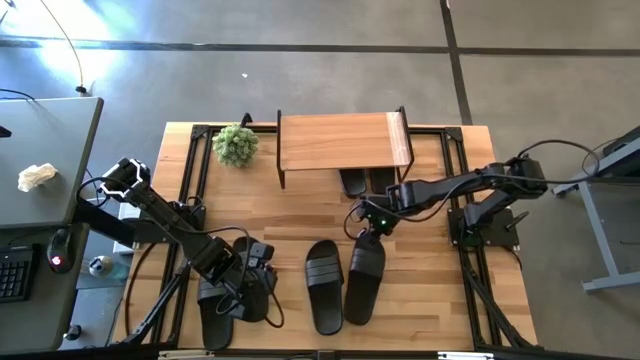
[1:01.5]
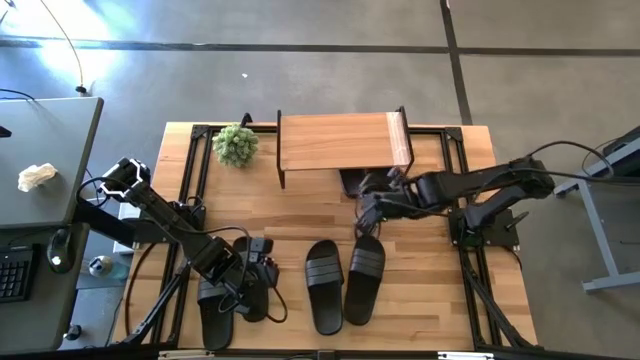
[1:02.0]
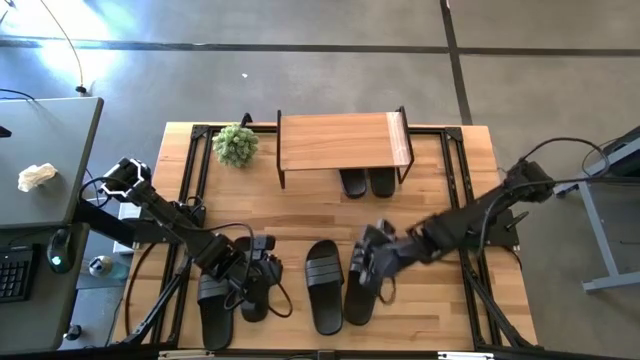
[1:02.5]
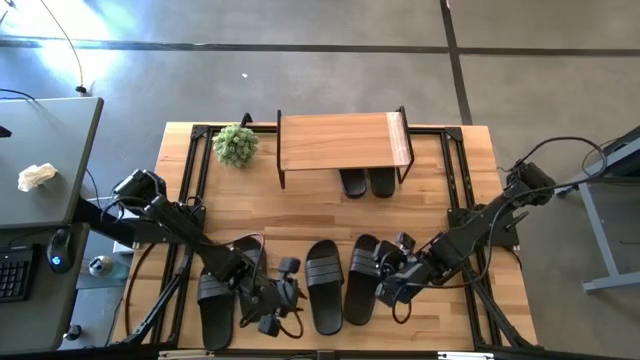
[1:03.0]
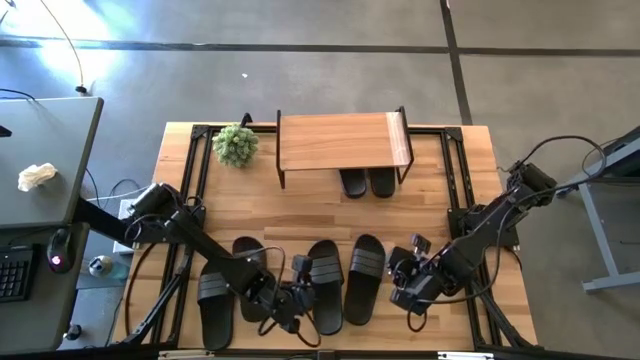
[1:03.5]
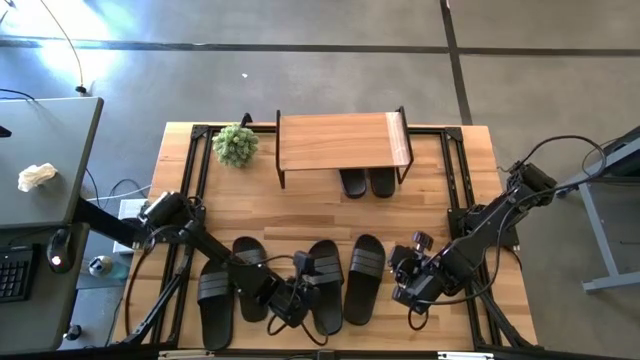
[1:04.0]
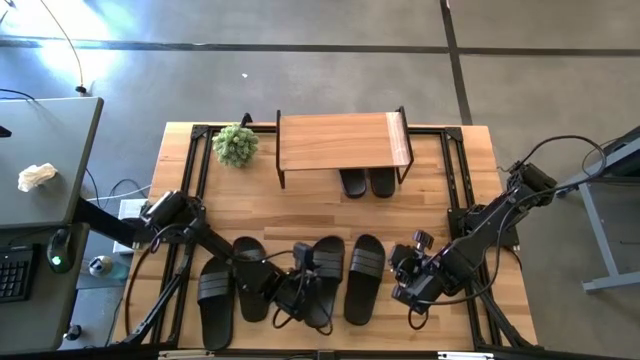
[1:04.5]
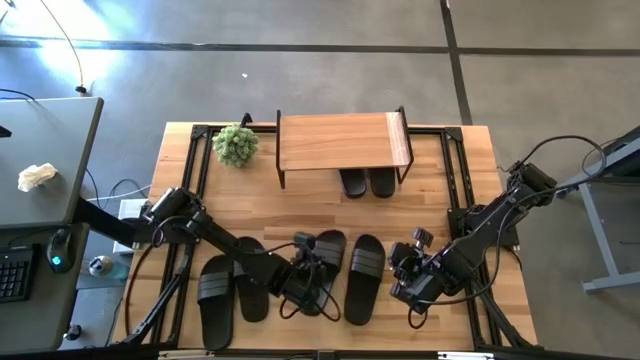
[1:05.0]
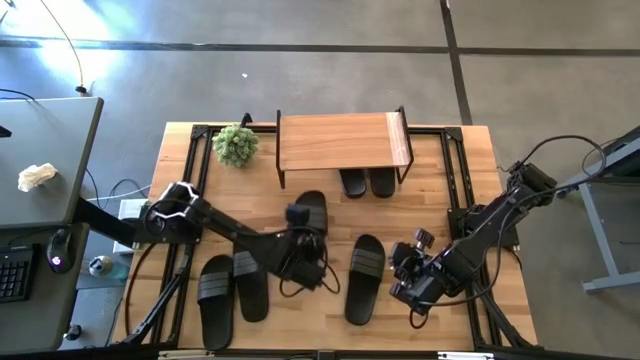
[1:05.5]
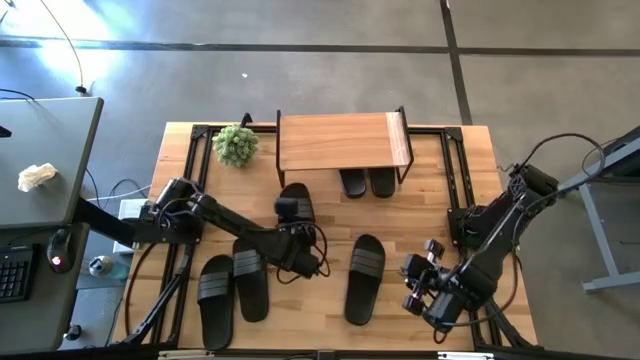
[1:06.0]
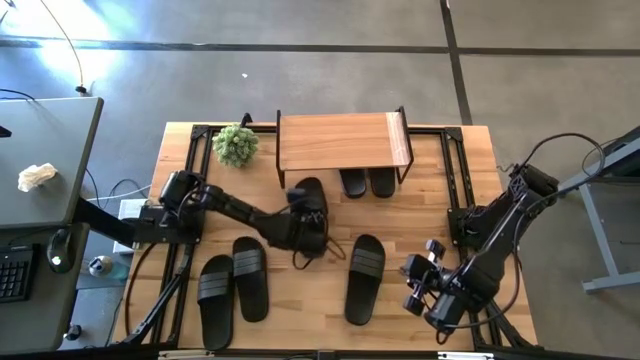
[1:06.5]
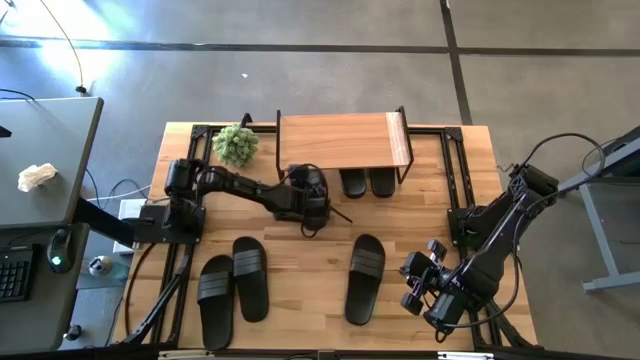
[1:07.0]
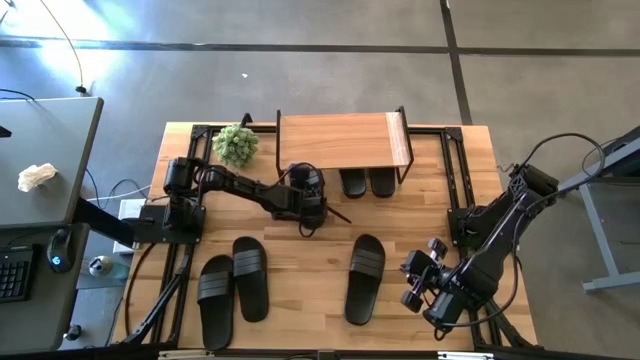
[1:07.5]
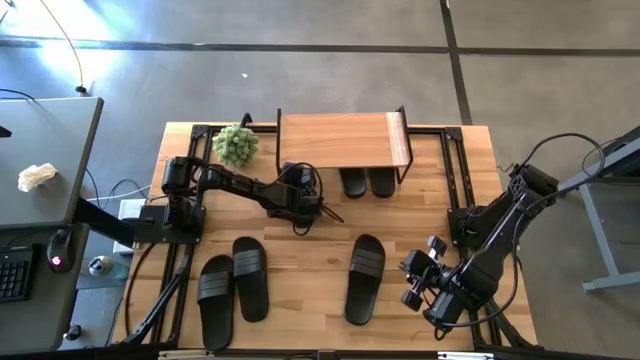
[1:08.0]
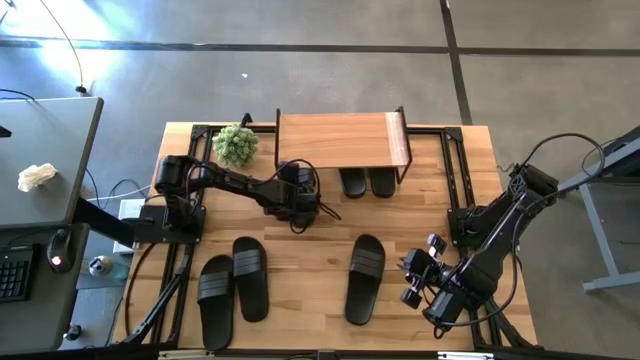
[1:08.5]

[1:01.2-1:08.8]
Task: Pick and place slides into the shelf
Put the black slipper under the shelf

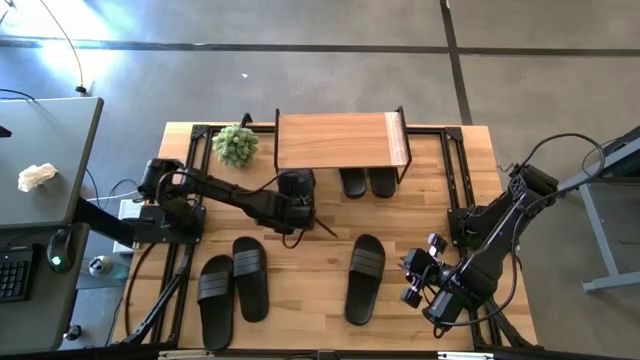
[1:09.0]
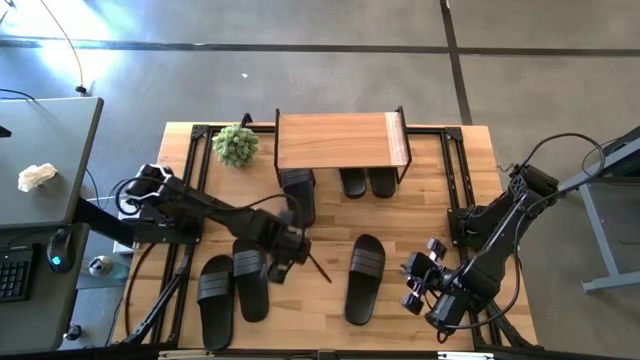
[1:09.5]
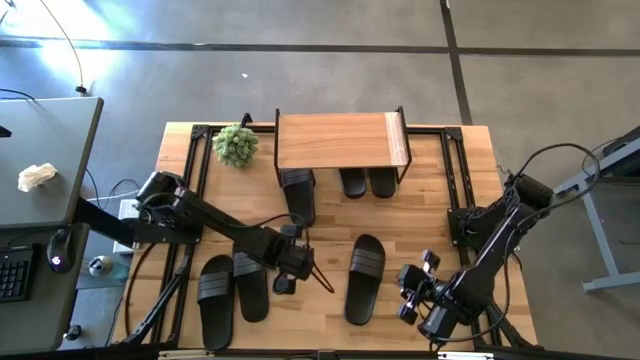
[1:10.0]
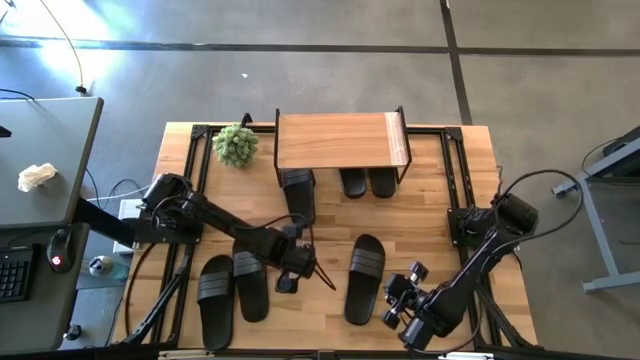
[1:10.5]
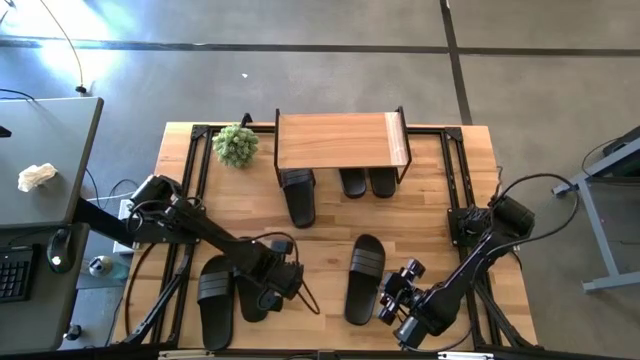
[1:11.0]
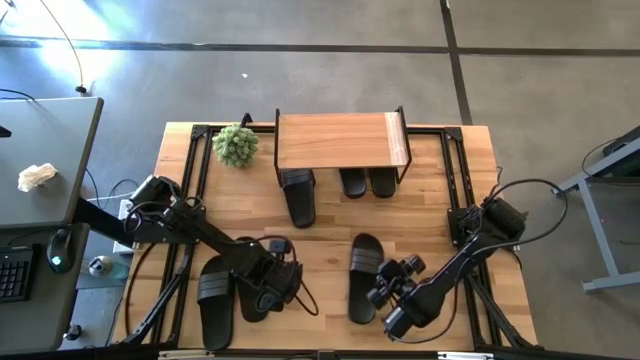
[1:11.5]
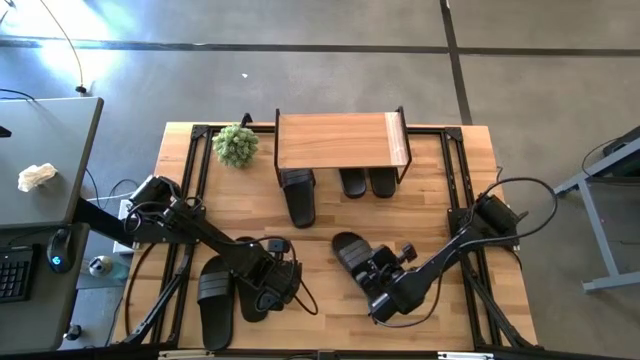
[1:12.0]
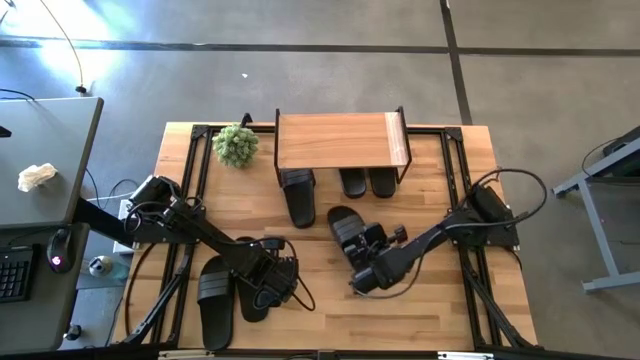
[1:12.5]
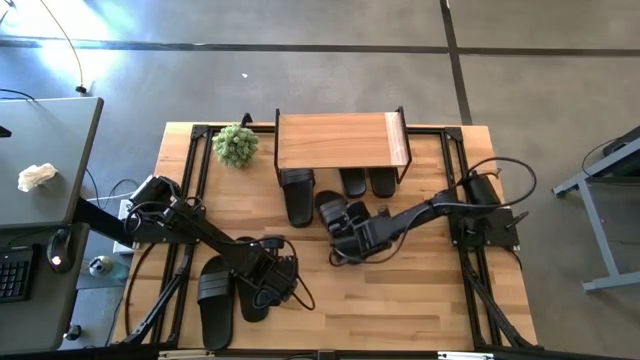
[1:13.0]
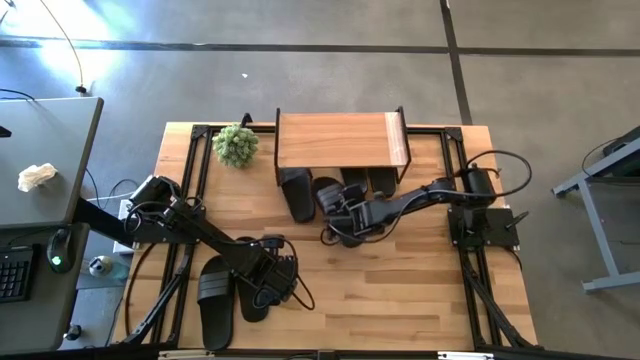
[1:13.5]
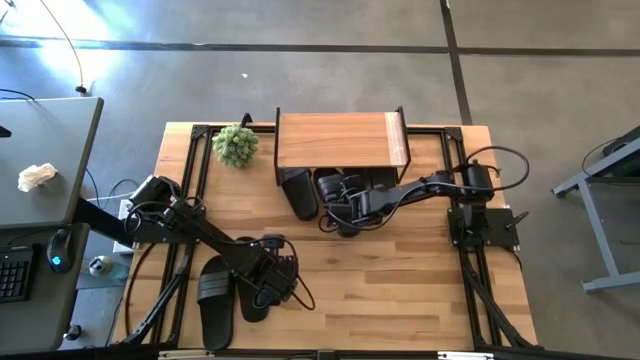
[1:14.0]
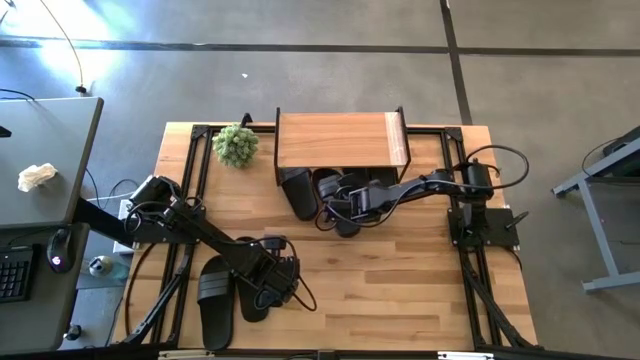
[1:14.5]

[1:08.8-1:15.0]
Put the black slipper under the shelf

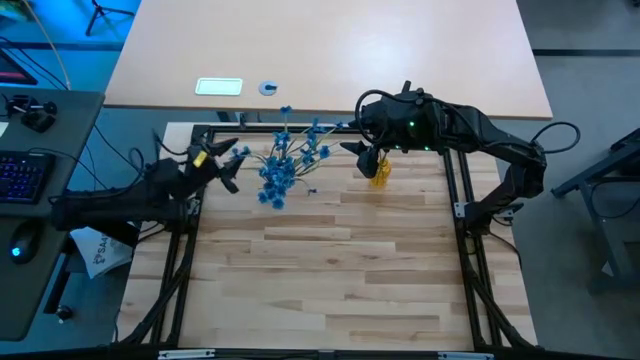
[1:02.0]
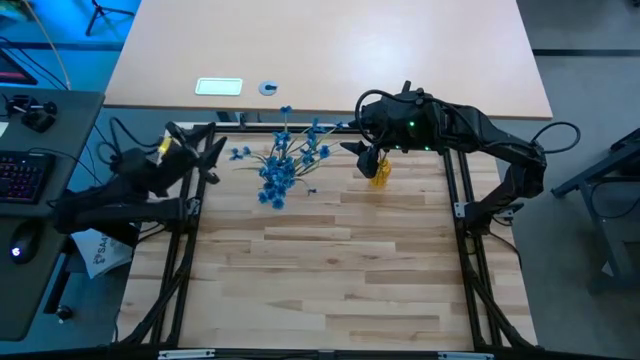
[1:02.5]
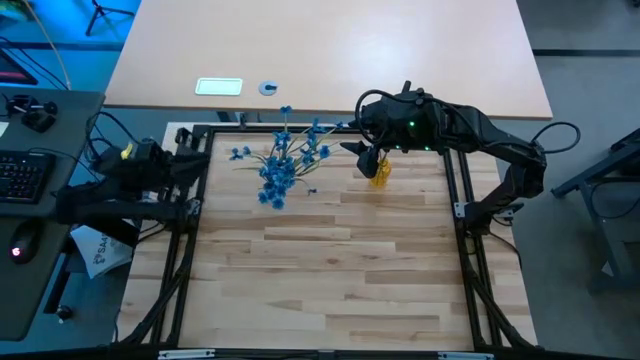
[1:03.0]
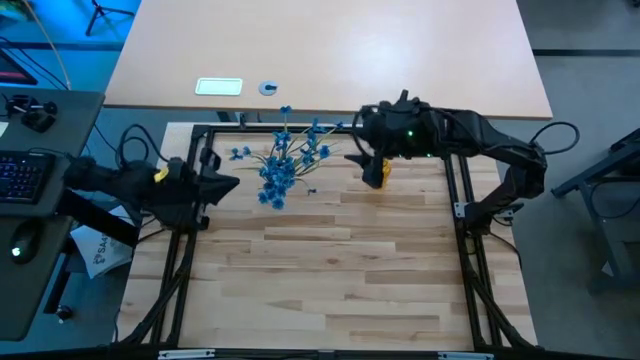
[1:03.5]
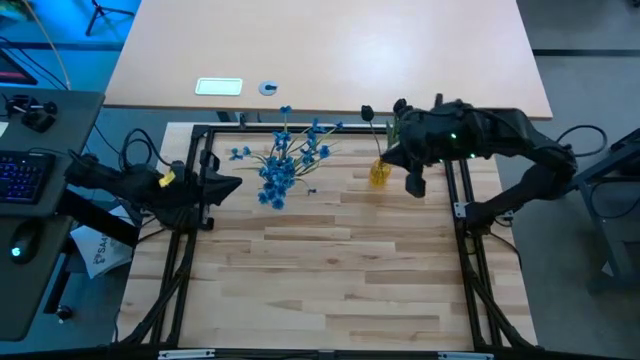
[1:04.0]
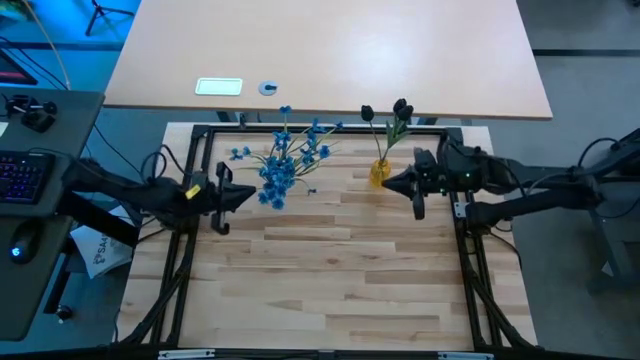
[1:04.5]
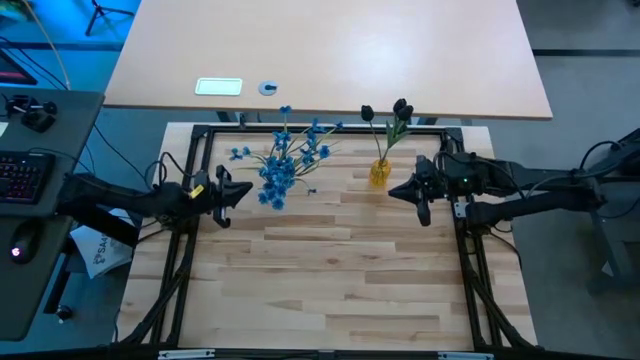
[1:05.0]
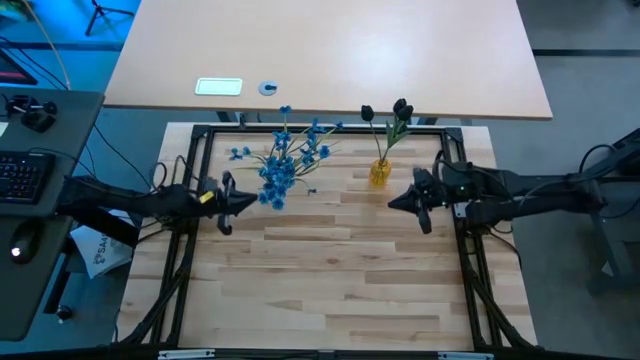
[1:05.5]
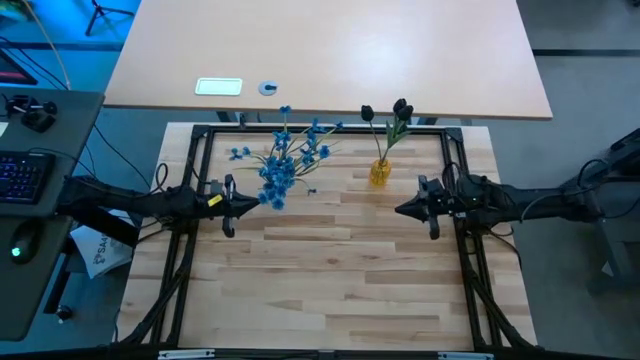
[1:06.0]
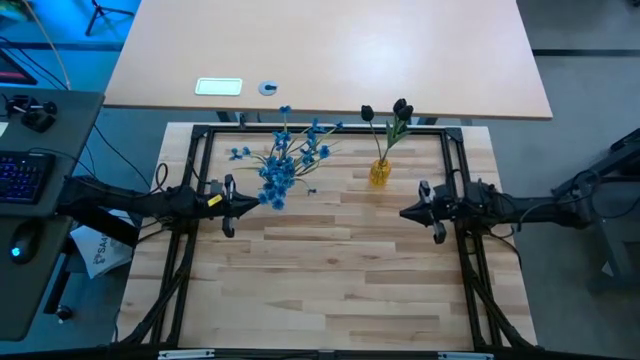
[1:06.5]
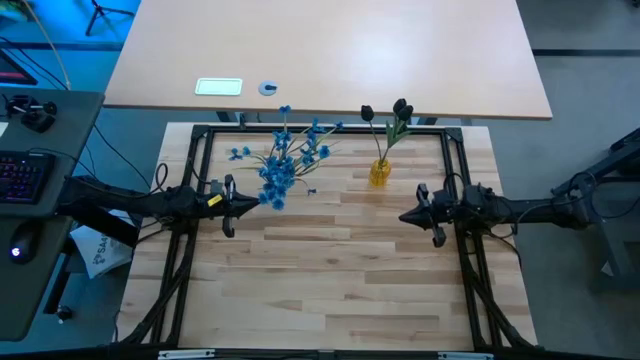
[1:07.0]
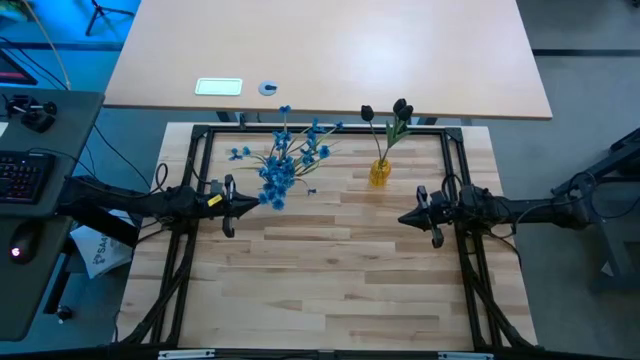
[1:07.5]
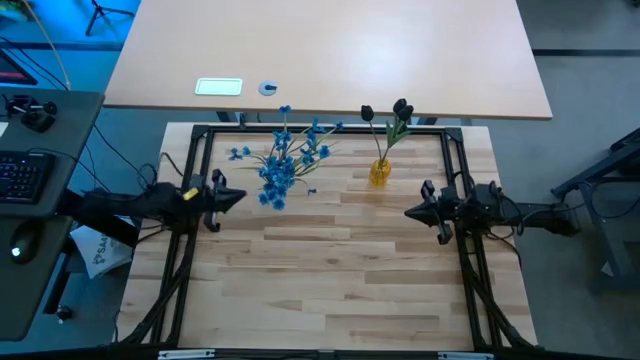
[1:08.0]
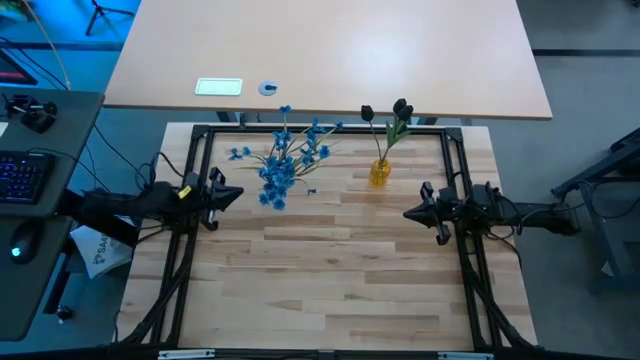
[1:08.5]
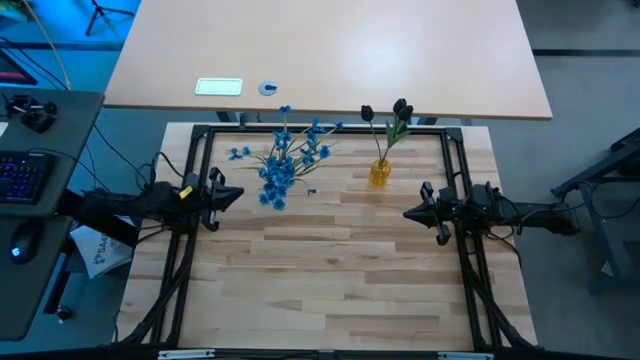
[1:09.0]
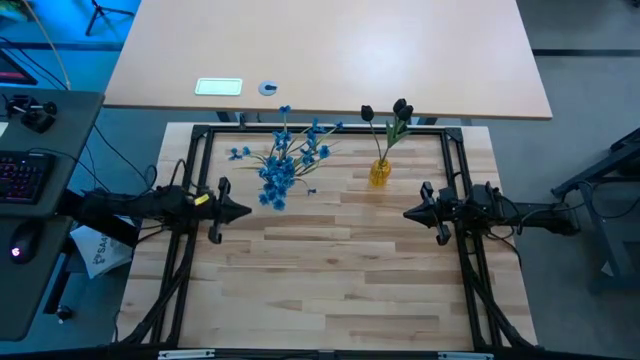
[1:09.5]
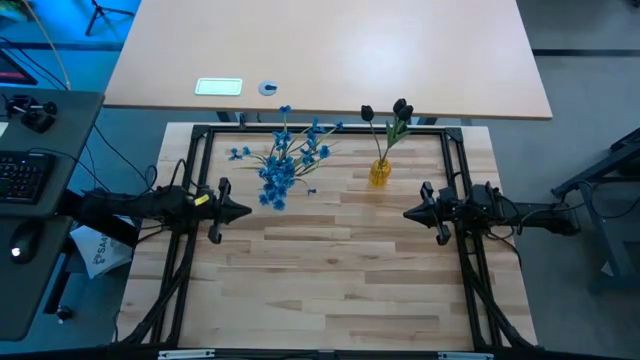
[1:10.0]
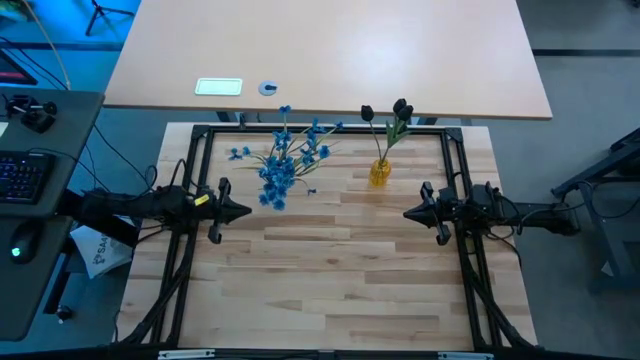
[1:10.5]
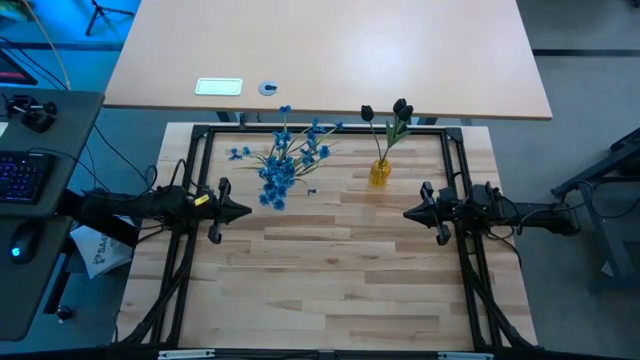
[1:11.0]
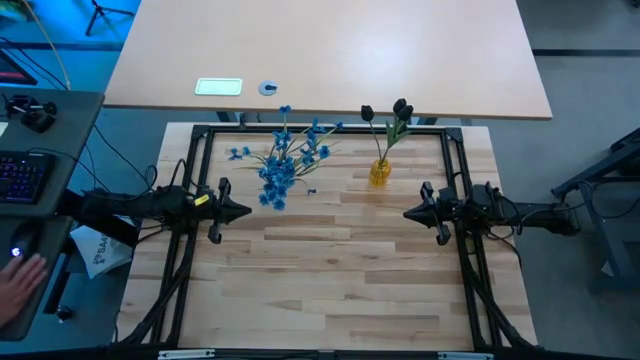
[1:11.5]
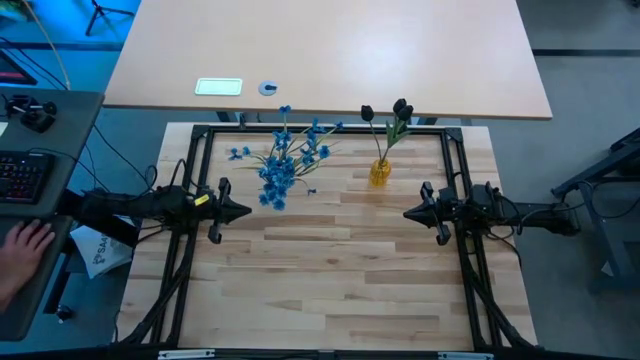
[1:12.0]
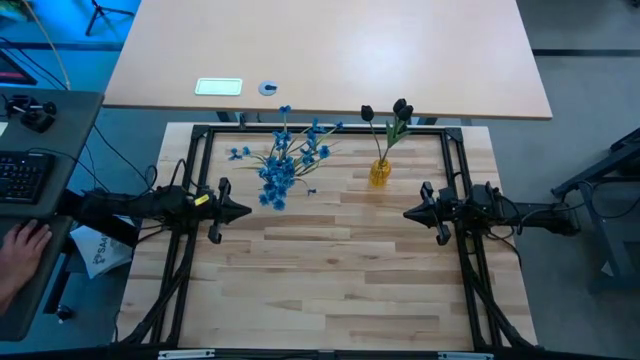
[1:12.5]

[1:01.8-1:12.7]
Task: Sort flowers into vase by color
Return to Home Position
